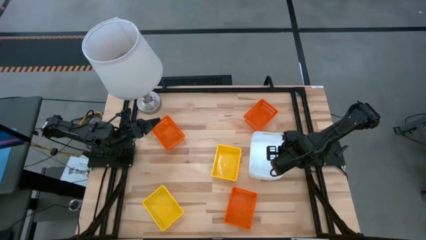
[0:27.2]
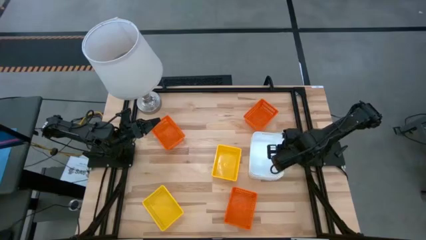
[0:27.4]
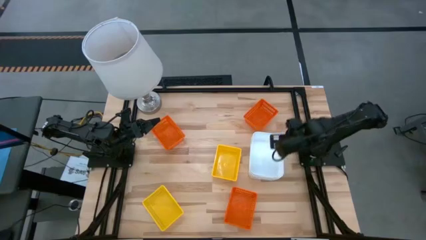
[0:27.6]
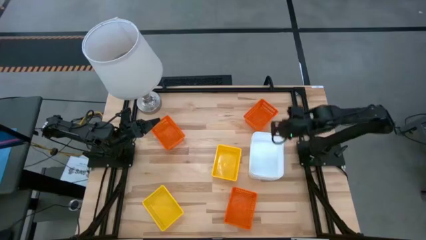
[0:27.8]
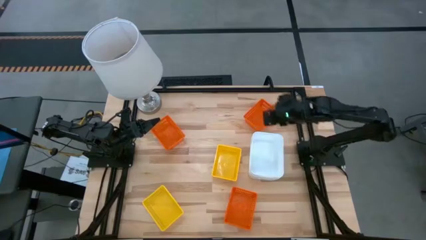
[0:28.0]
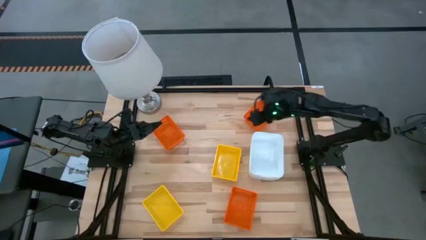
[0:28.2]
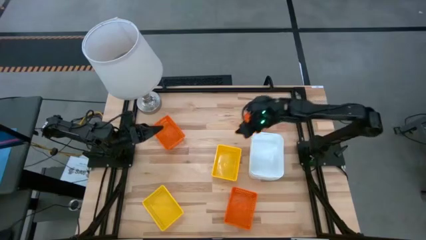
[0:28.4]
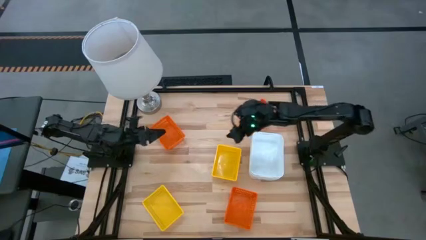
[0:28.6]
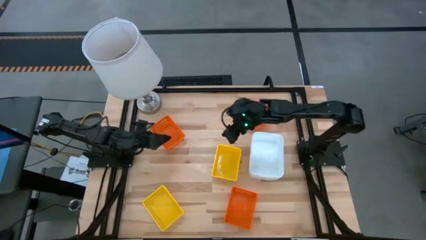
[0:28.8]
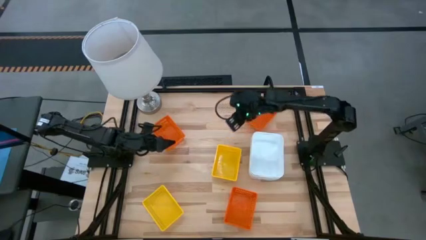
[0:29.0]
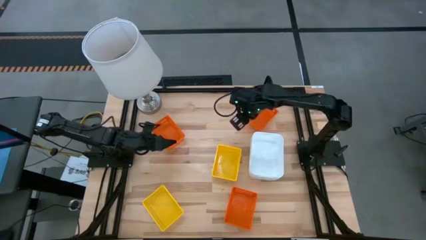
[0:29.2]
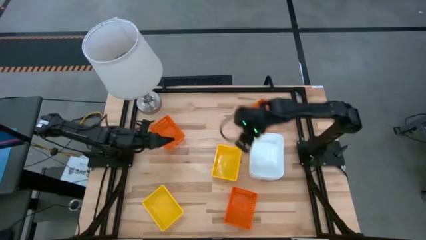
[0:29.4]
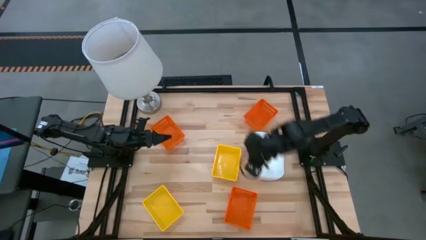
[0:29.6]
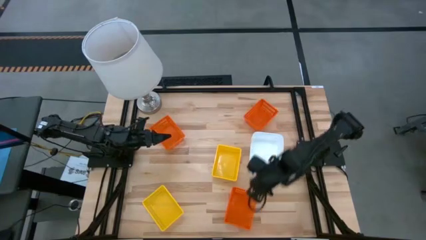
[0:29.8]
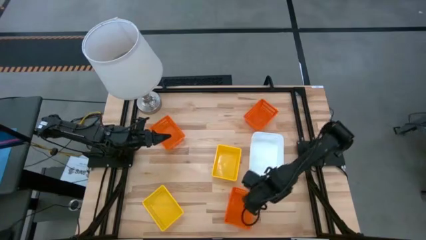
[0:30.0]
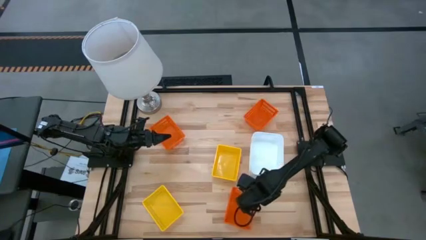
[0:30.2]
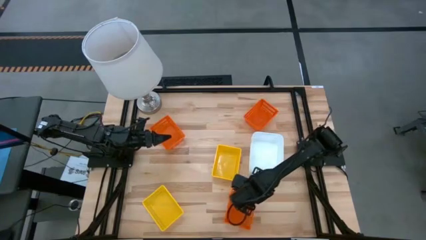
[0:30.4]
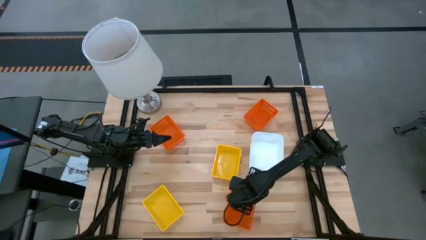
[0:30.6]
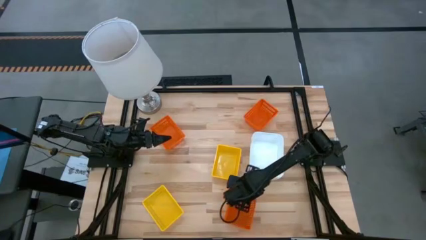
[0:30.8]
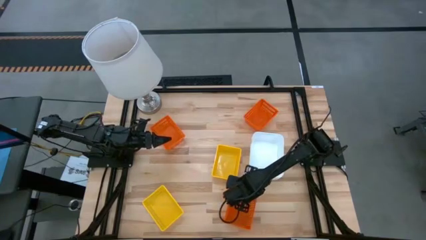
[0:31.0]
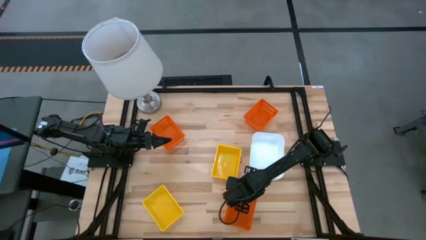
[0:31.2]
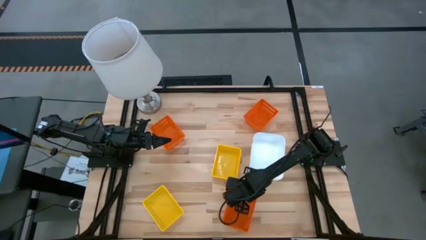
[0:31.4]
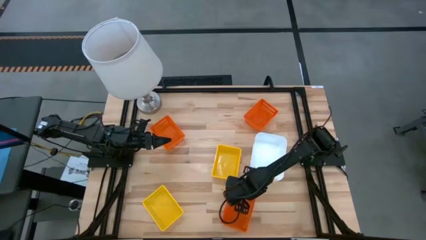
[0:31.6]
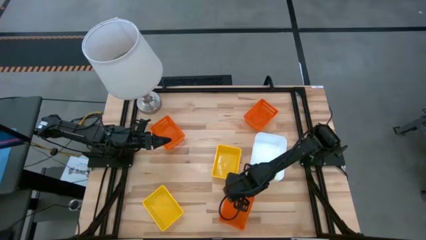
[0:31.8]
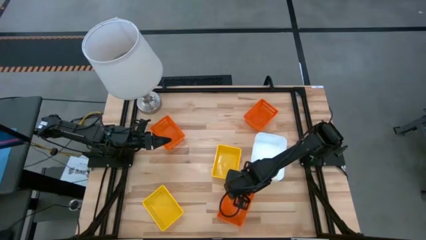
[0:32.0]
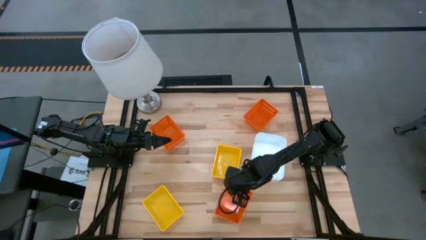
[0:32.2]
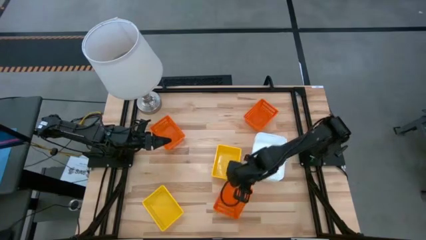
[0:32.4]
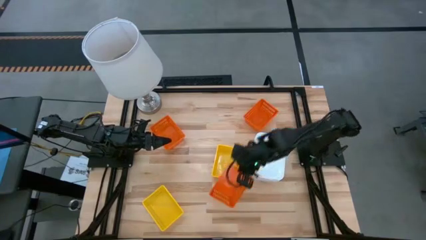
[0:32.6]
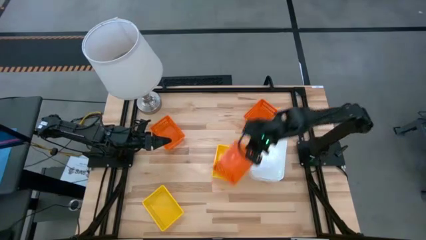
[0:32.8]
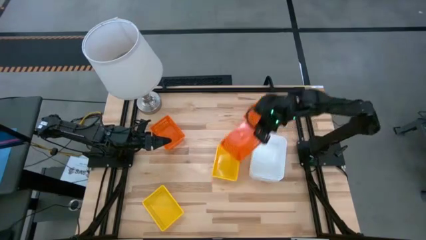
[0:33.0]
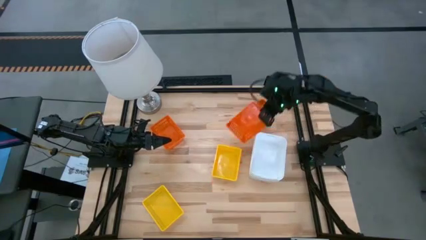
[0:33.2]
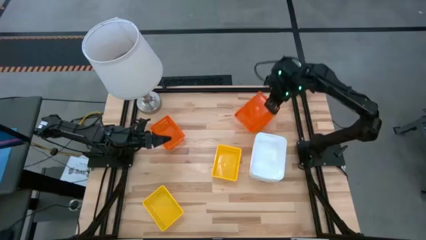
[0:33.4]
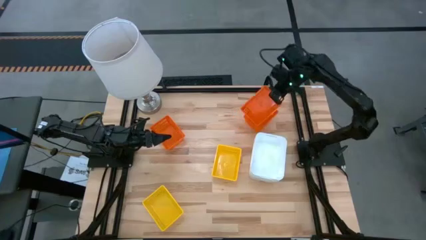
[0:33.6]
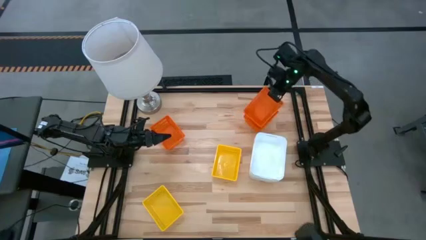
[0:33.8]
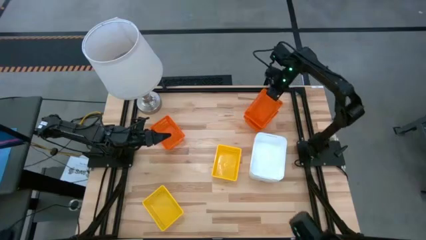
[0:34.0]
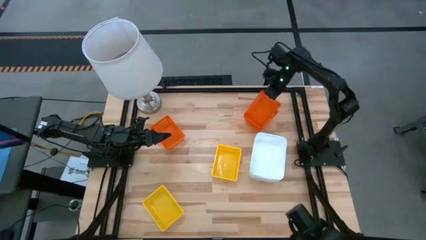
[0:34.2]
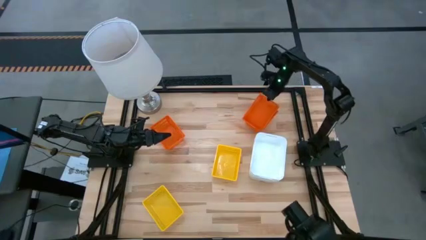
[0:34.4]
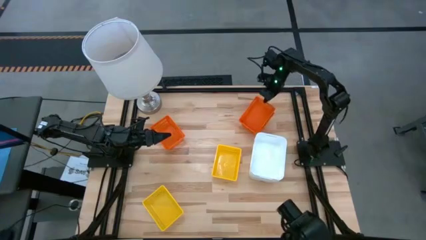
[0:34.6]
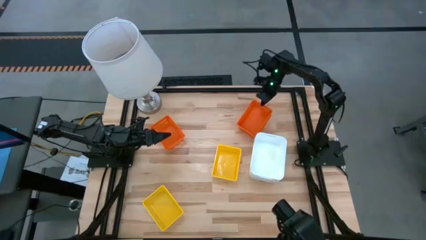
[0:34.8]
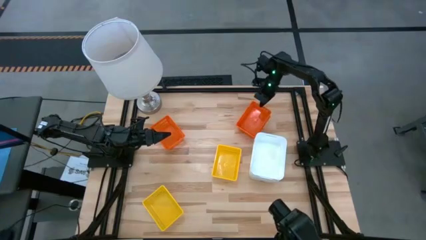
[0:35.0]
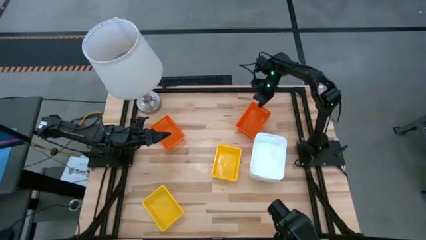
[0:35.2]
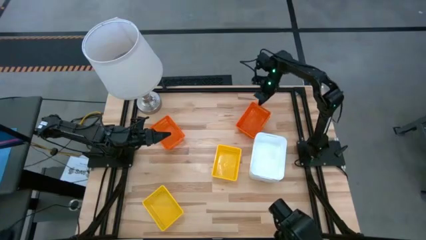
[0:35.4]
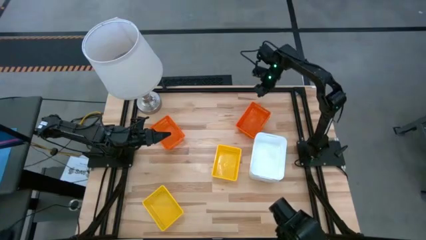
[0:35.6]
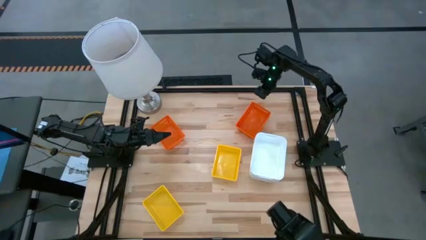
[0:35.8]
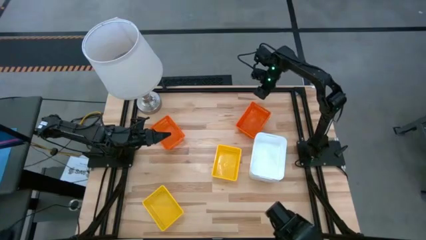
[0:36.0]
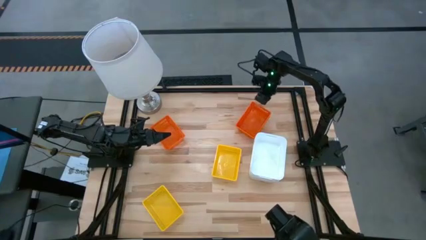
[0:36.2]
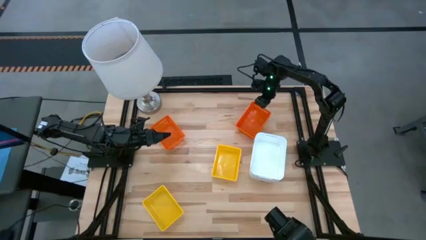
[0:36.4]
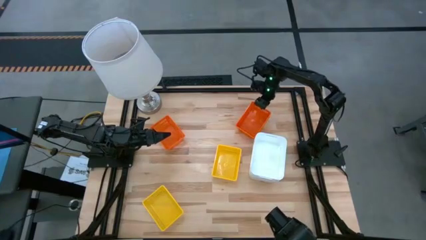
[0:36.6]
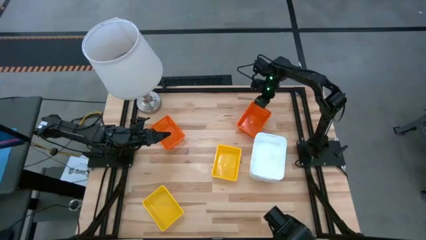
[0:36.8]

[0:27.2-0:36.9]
Stack the bottom orange bin on the top right orange bin

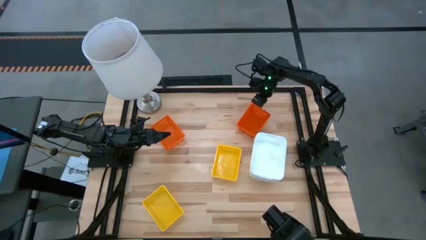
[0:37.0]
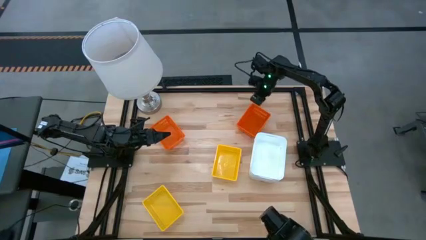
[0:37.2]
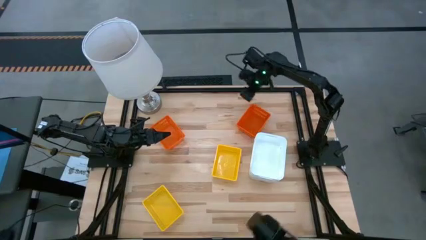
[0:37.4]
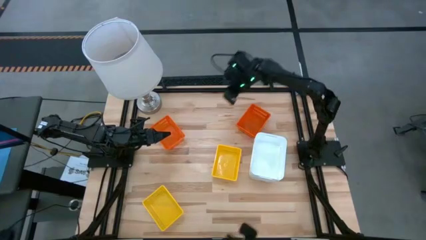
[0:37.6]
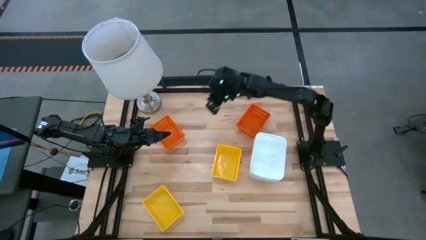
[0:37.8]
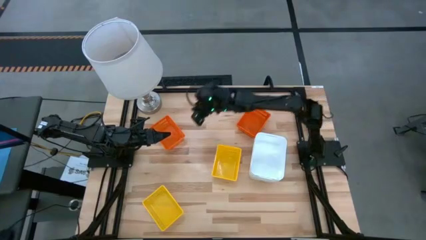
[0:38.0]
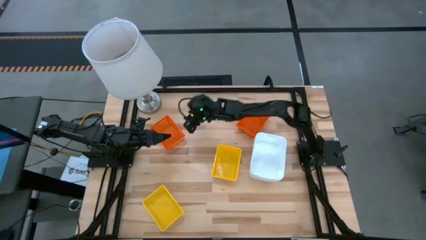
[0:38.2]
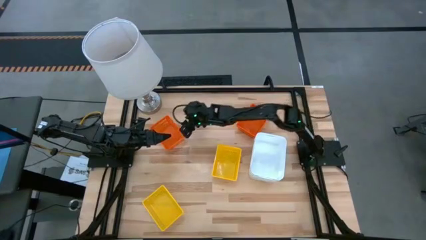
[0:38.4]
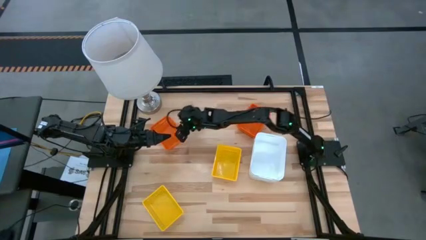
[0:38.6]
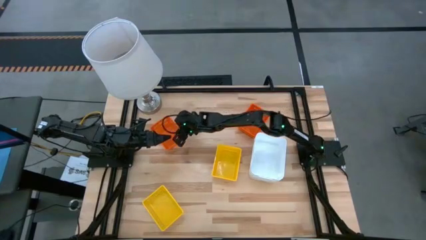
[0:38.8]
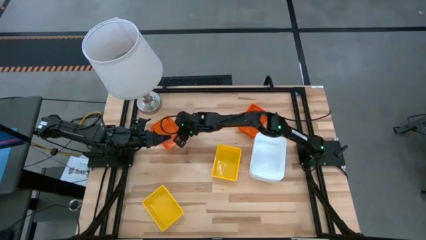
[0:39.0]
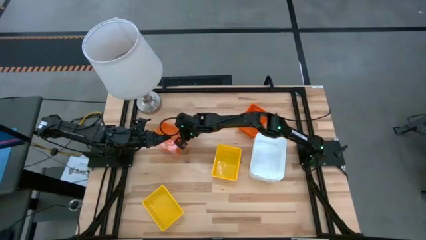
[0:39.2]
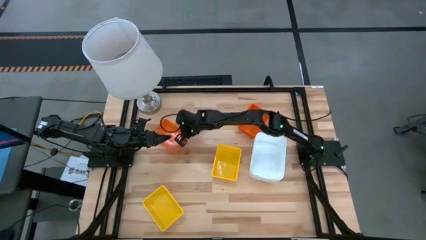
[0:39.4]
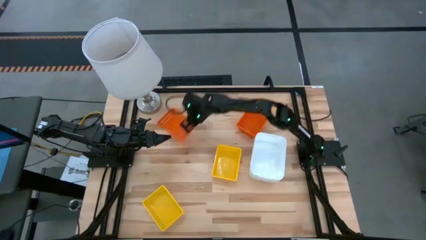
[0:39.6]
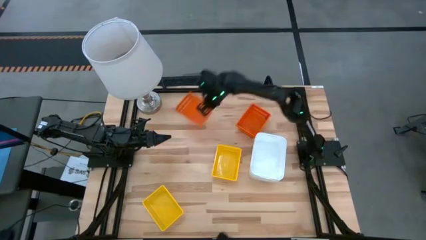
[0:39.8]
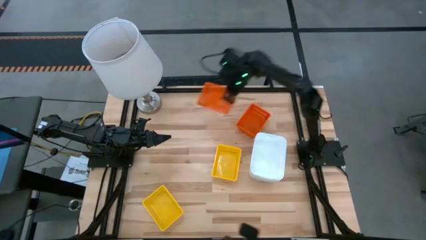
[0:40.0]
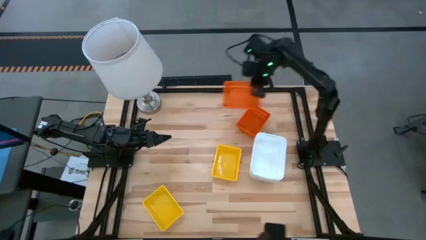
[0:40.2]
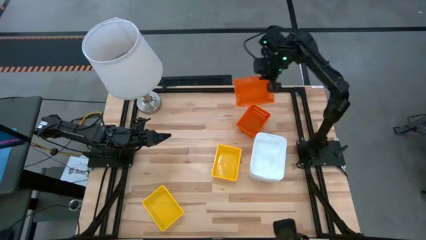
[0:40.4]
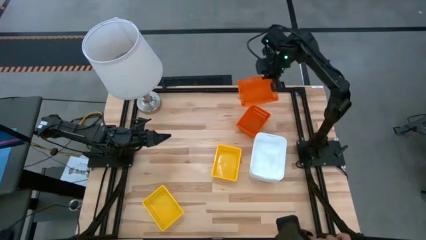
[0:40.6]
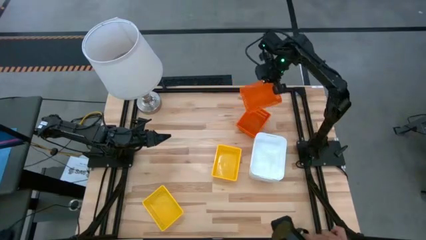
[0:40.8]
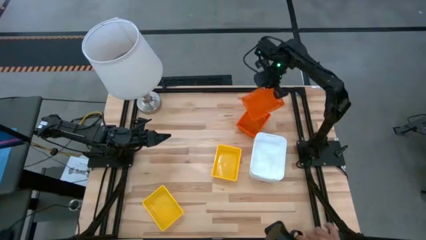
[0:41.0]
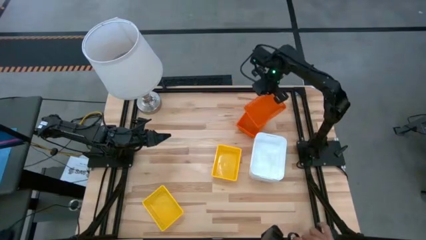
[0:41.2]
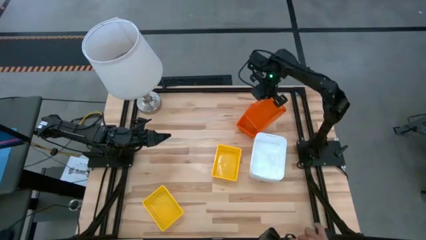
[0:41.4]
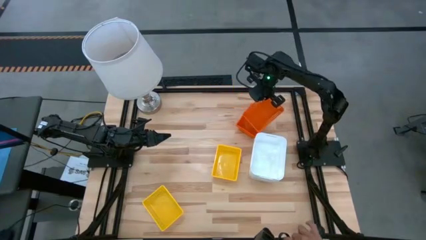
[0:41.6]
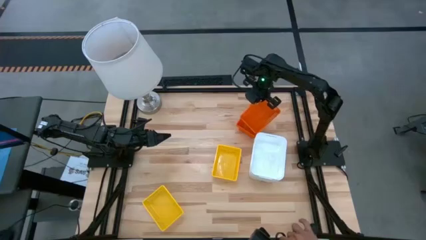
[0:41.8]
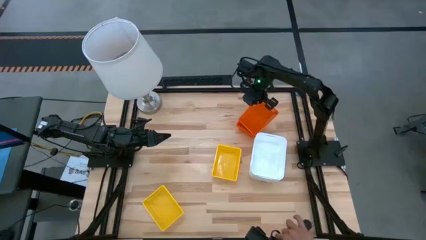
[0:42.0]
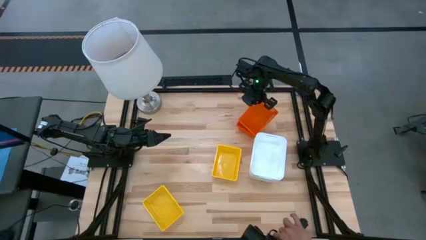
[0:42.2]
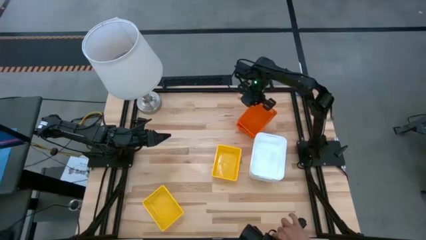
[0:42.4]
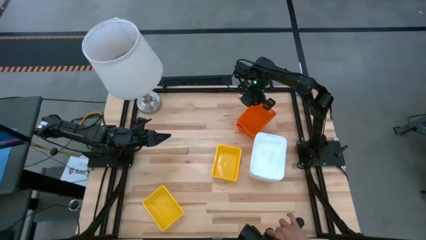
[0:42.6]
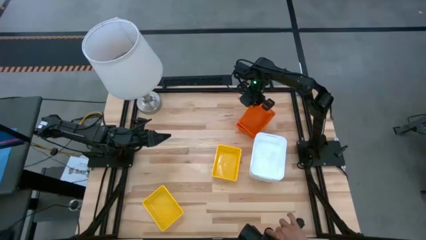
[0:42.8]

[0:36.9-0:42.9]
Stack the left orange bin on the right orange bin
